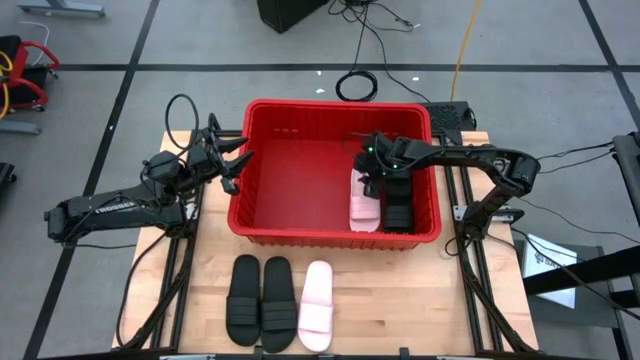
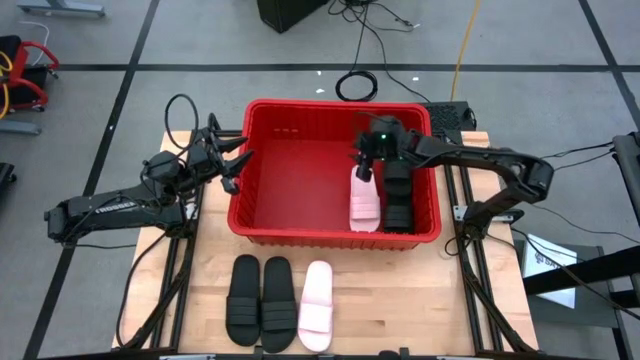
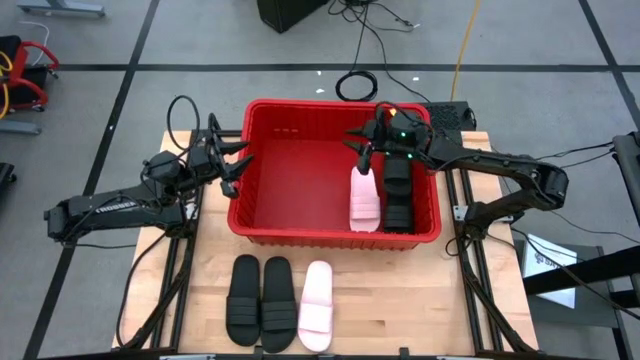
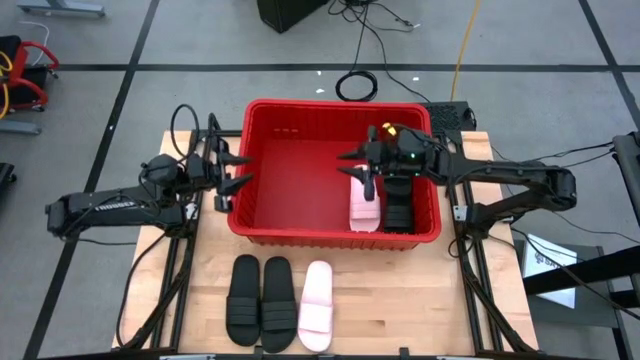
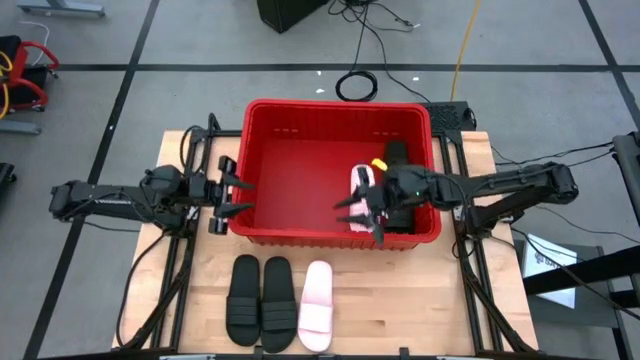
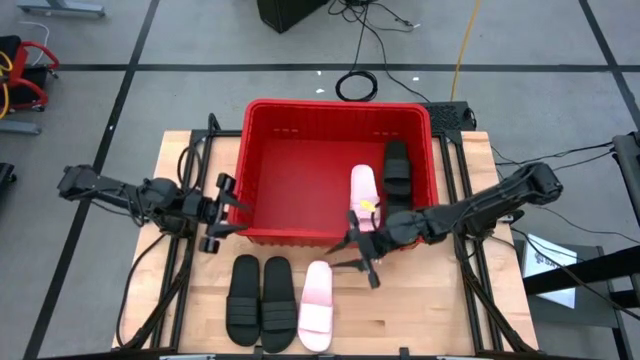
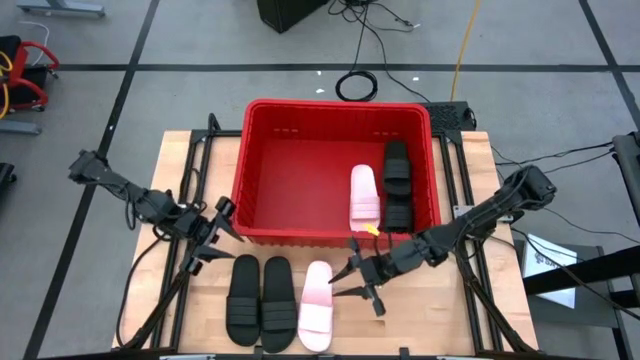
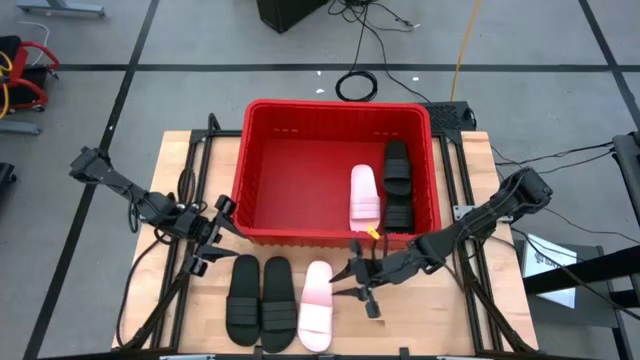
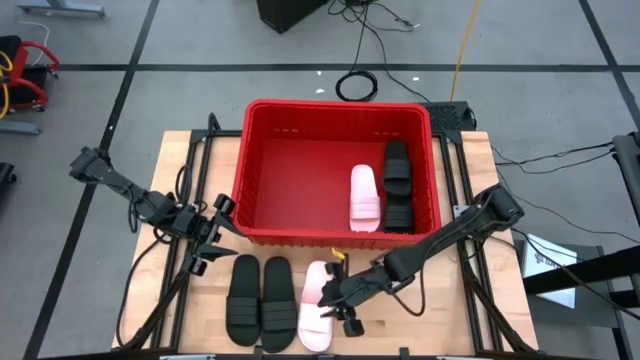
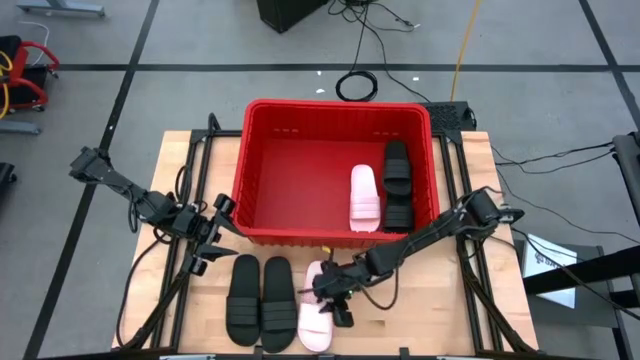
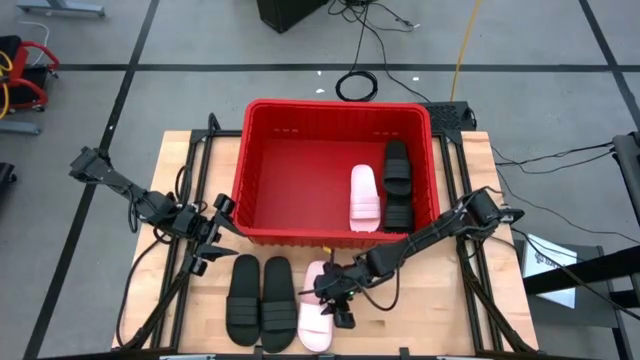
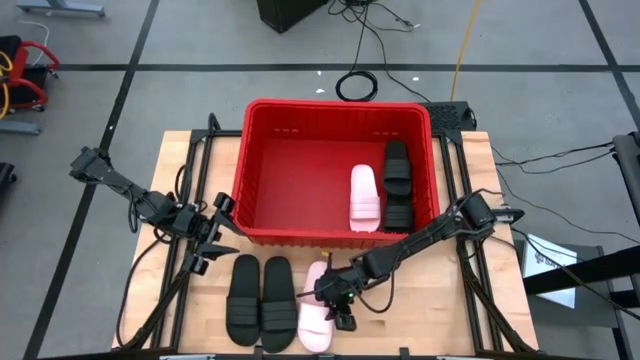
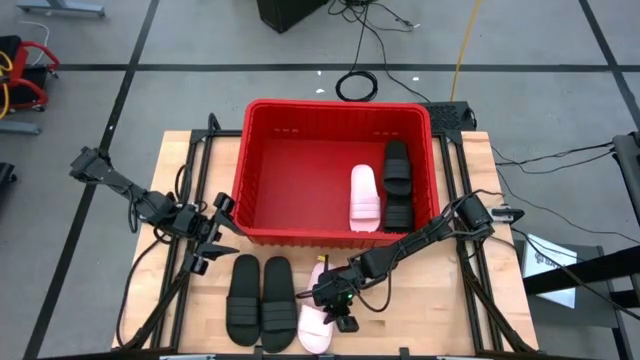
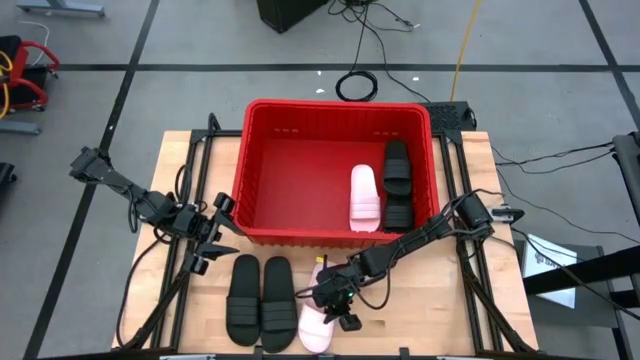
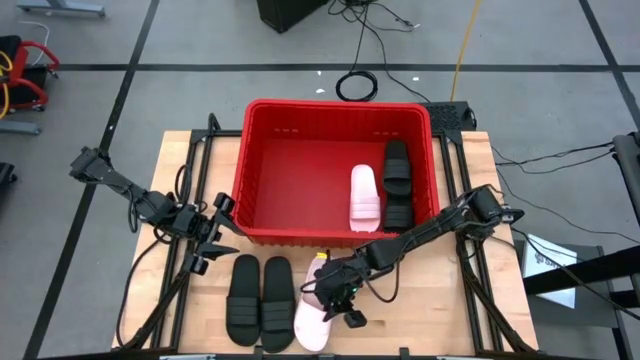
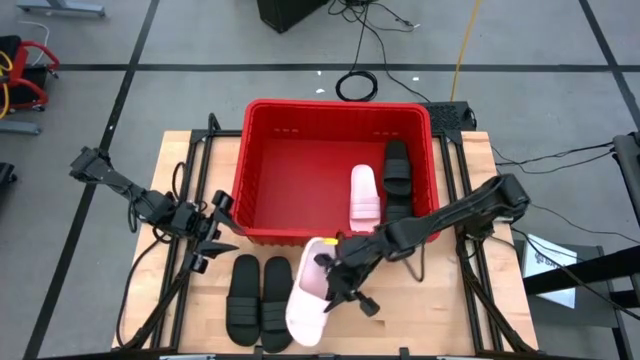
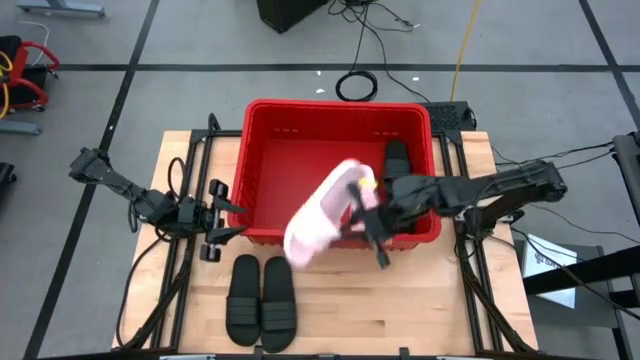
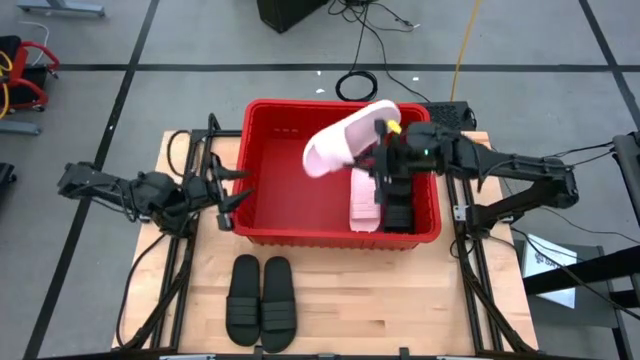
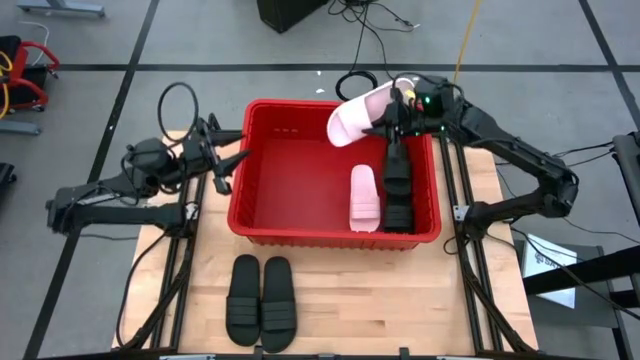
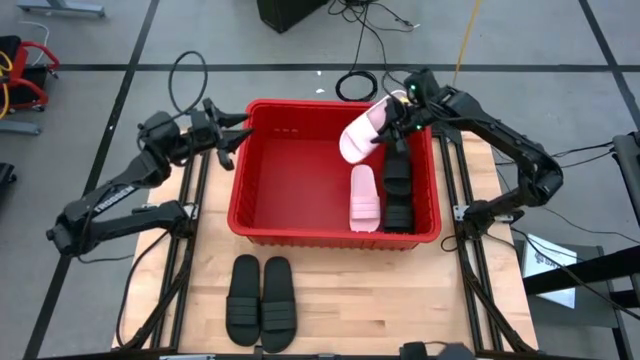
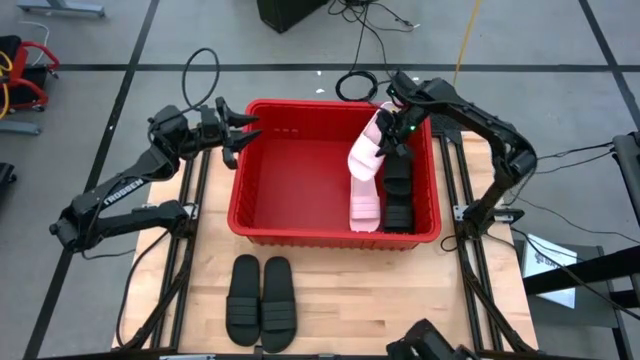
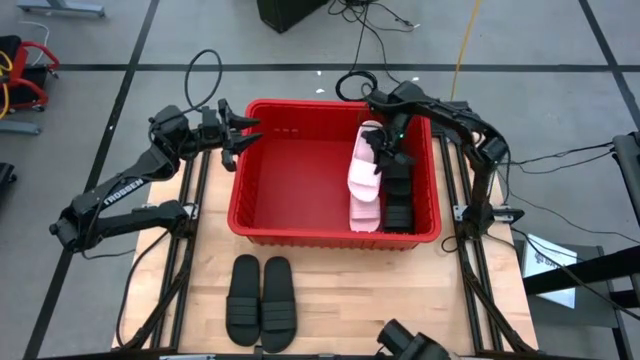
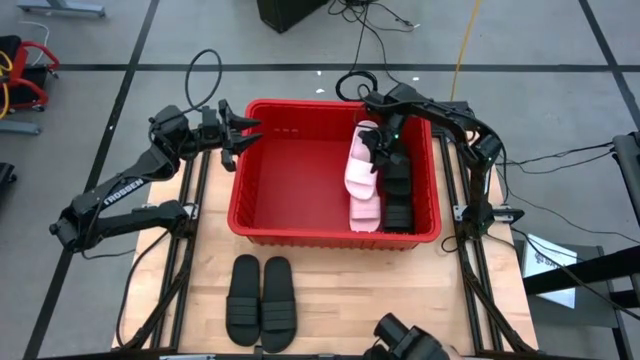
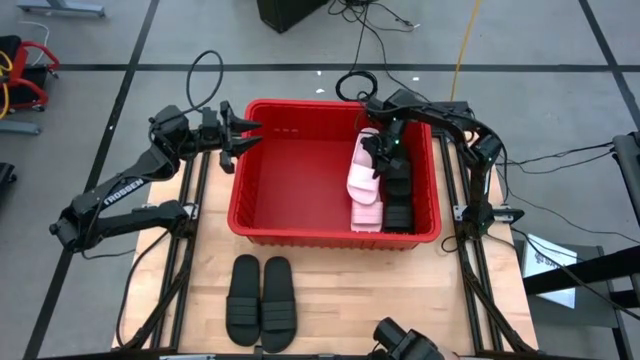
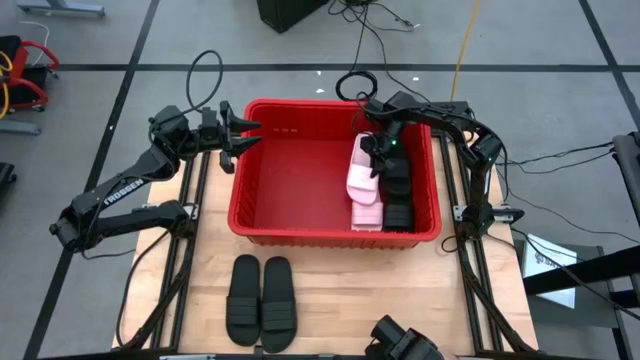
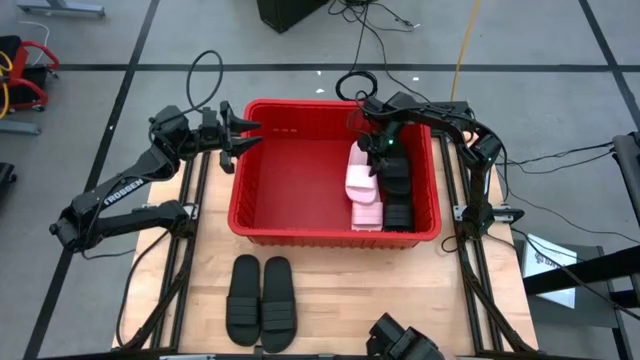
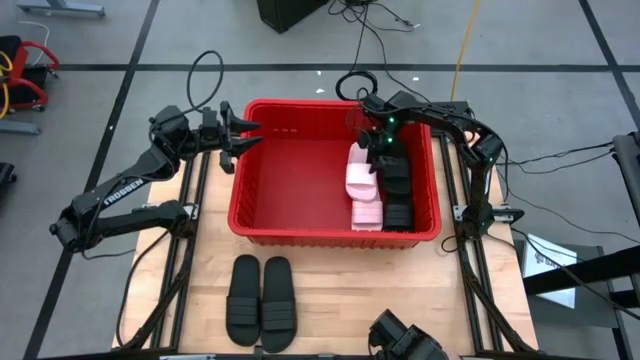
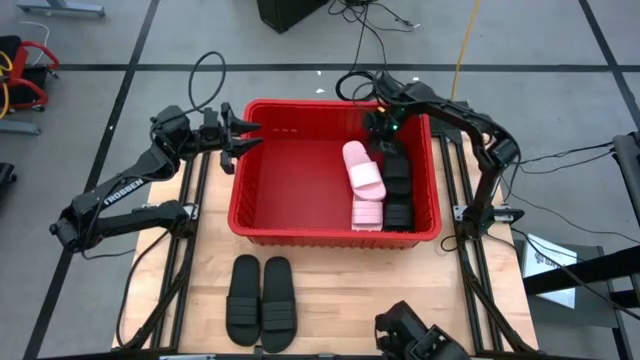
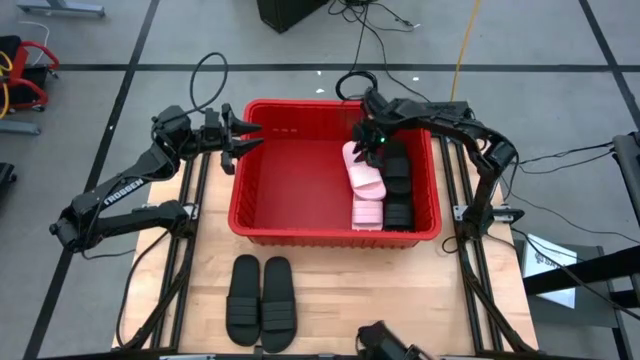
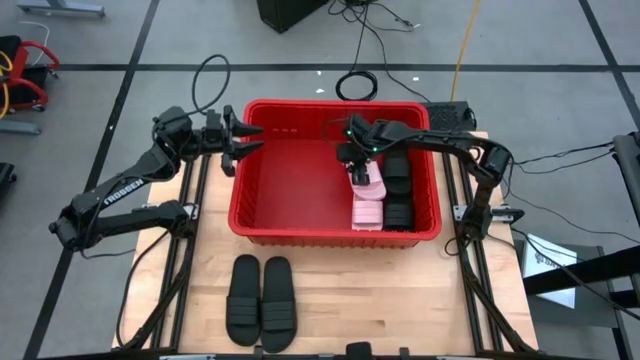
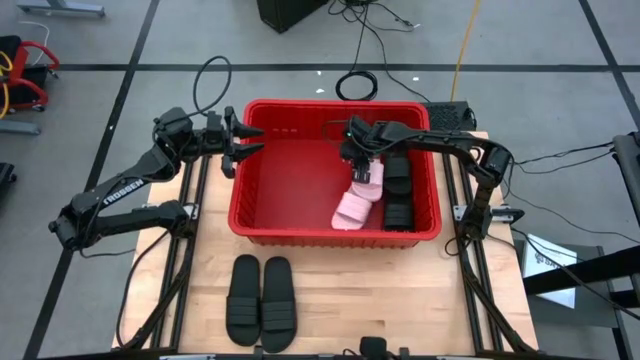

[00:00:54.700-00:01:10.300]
Task: Pick and place slides into bin
Put the white slide into the red bin

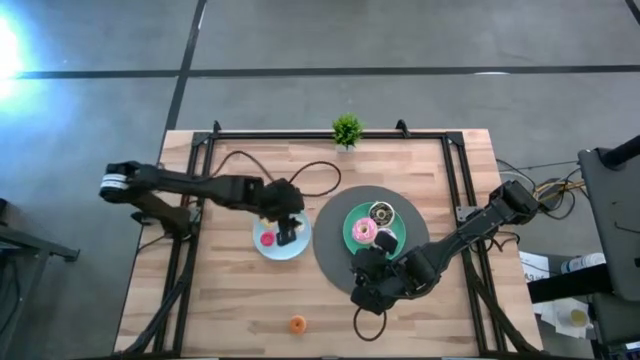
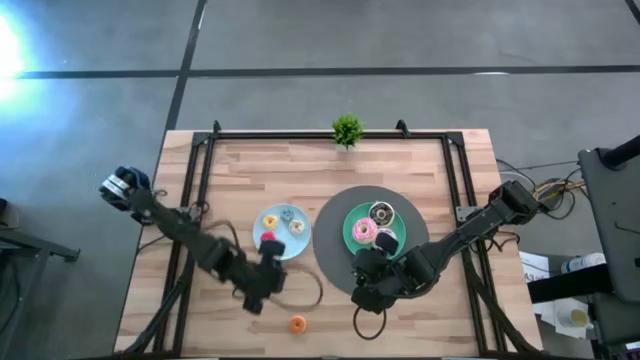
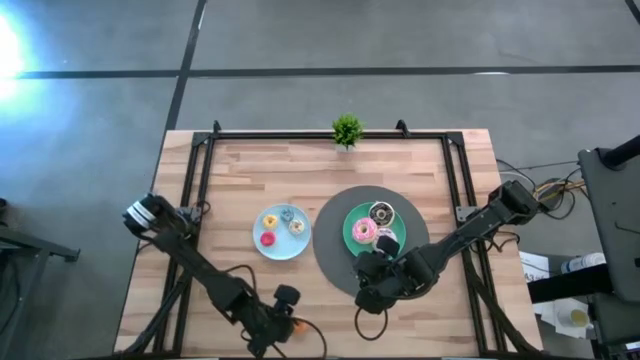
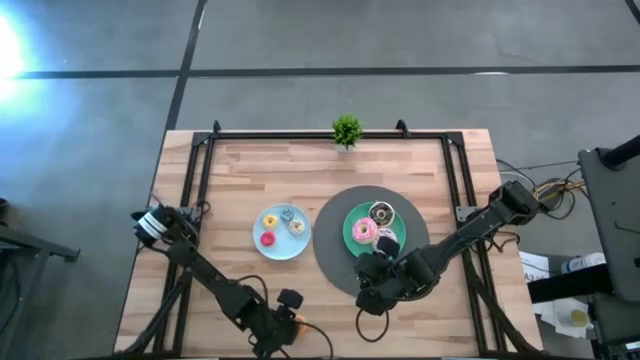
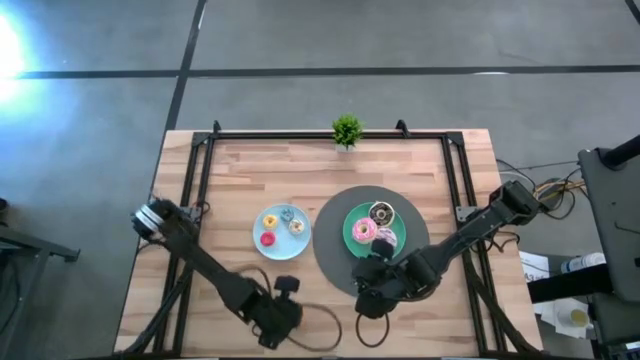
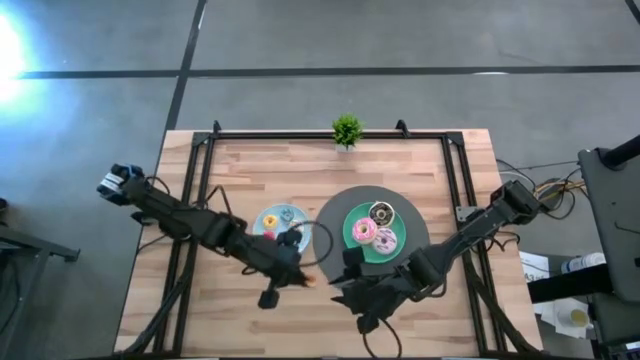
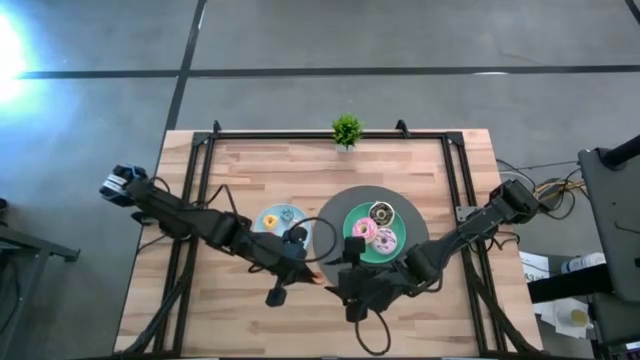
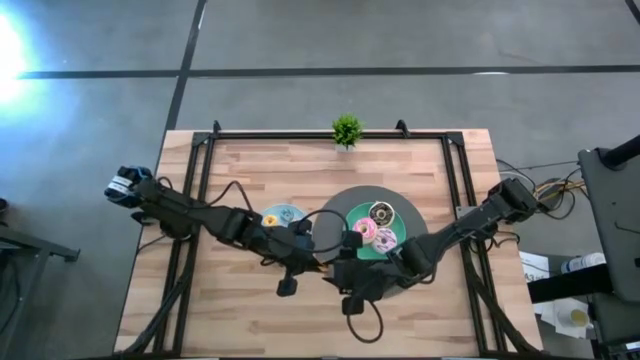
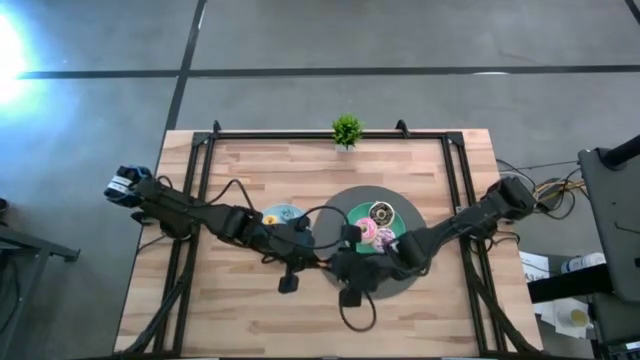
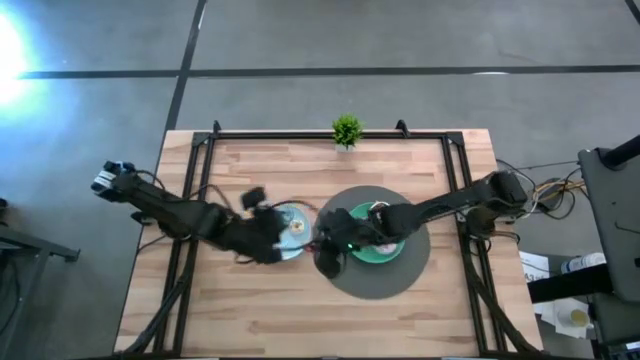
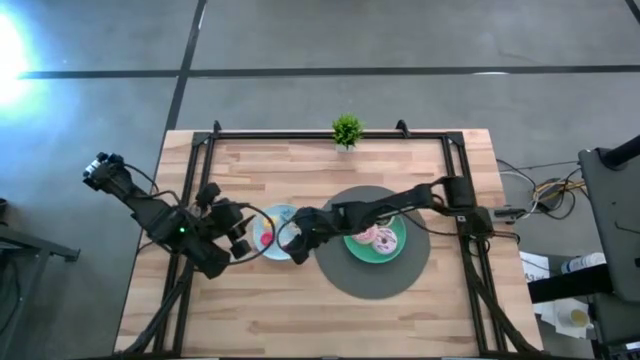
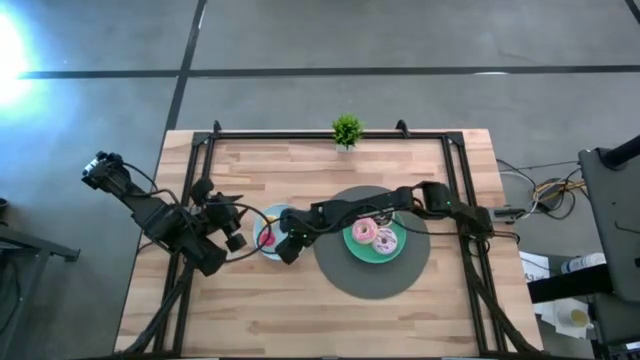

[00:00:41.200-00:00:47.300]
Task: Pick & Place donuts
Put the small orange donut on the blue plate
